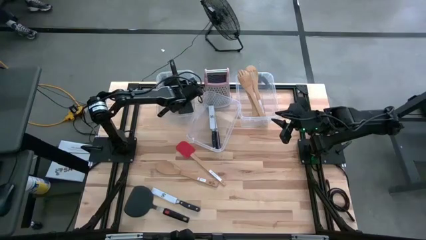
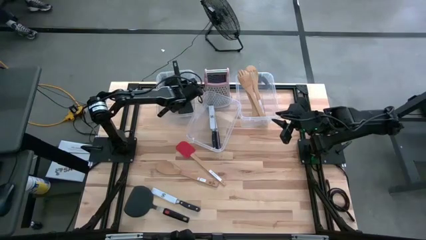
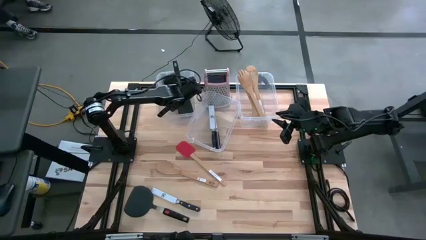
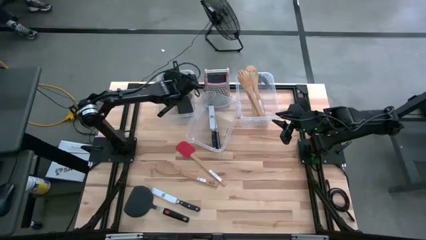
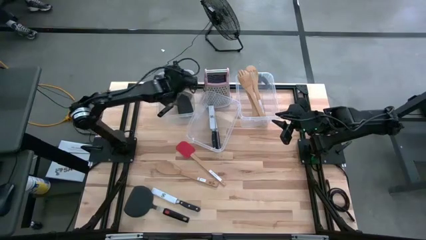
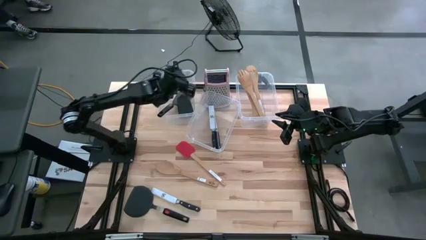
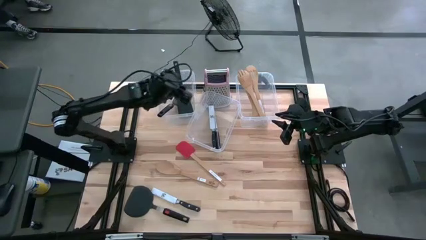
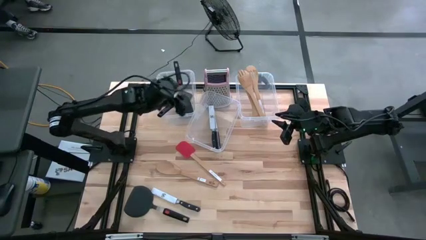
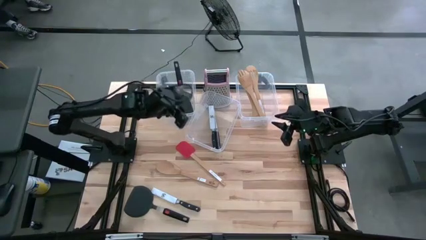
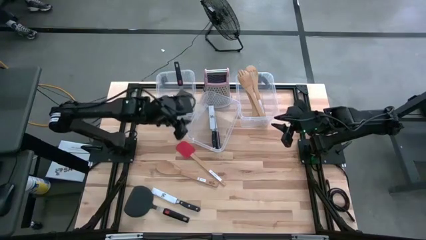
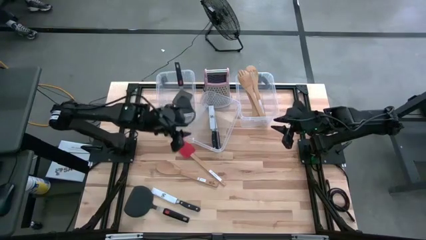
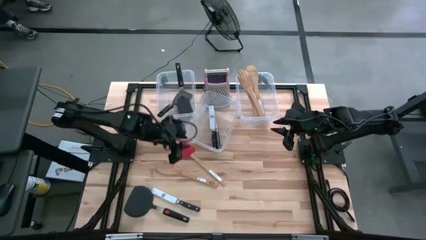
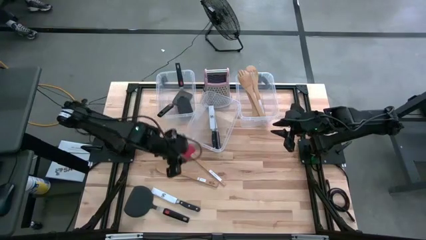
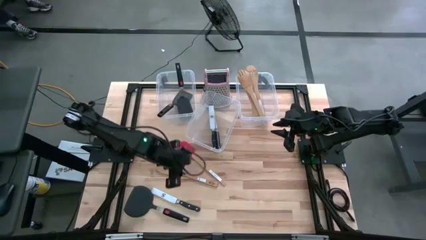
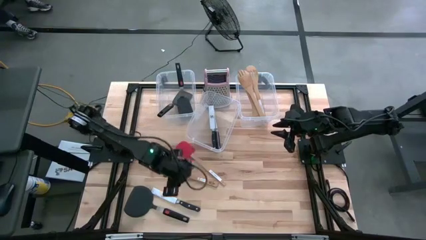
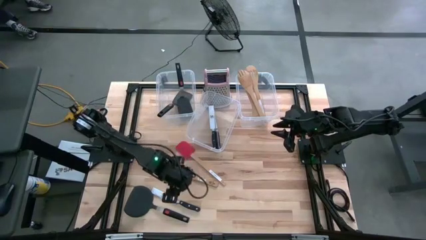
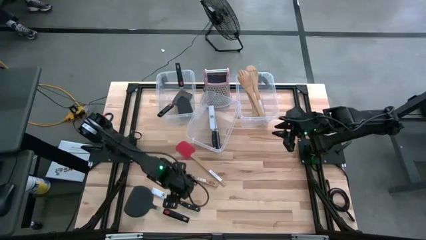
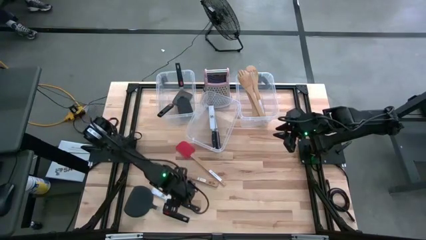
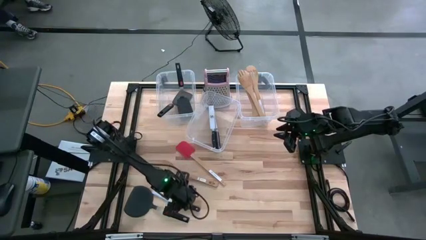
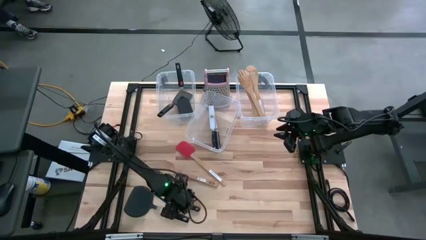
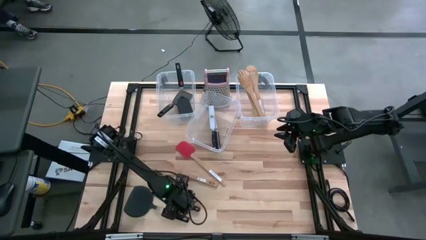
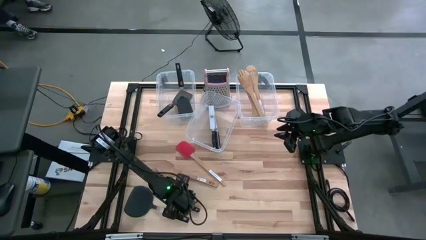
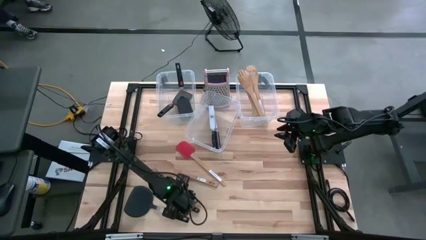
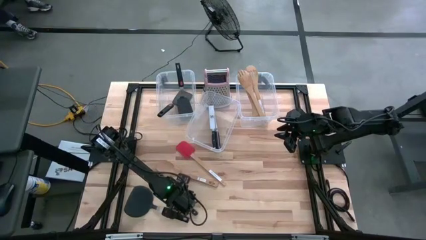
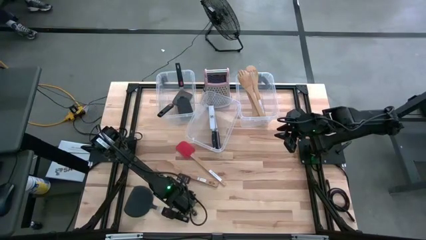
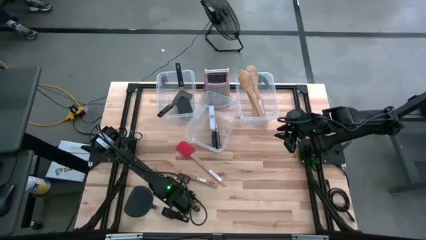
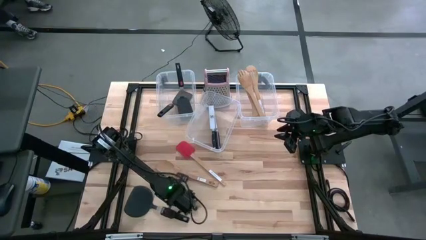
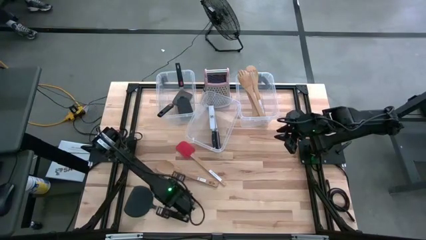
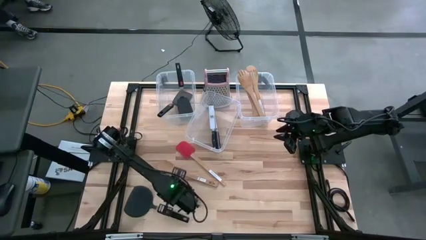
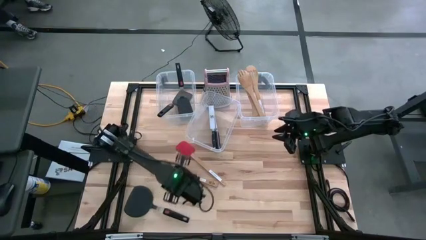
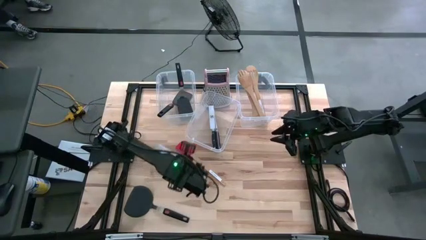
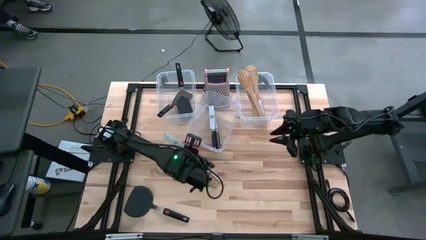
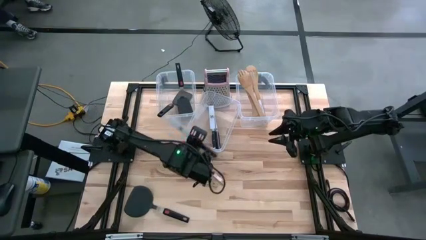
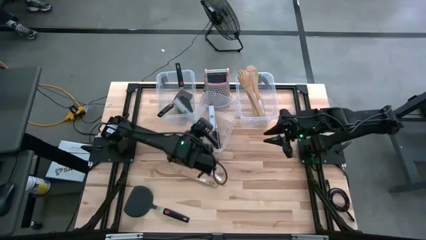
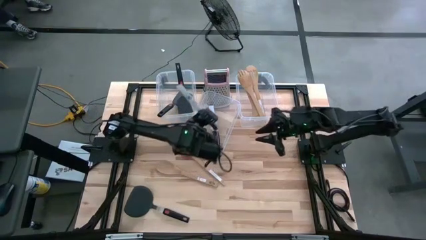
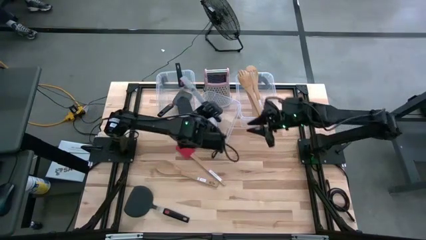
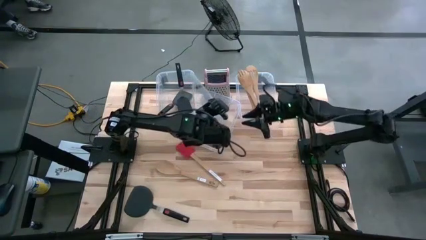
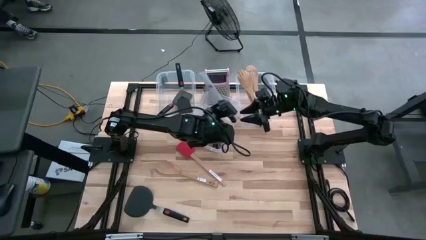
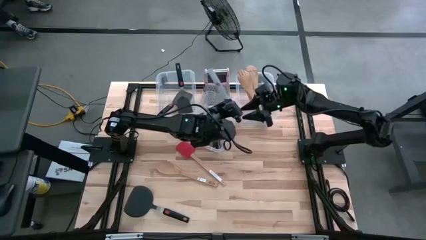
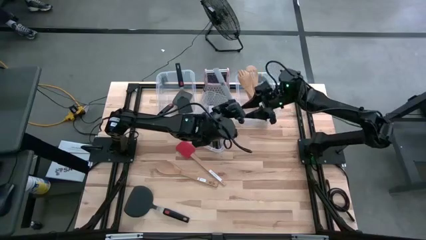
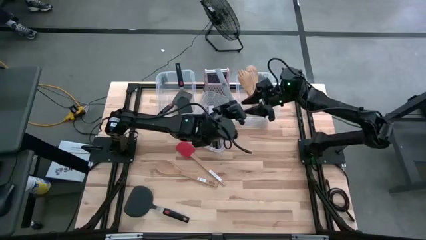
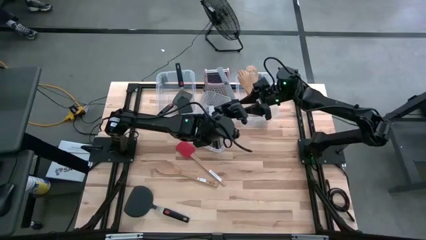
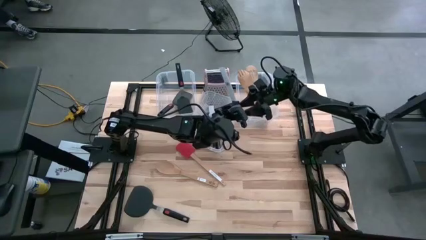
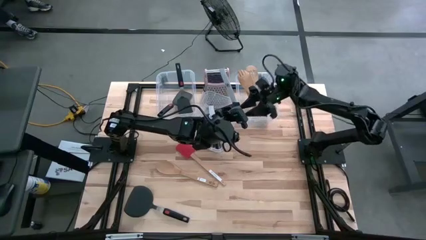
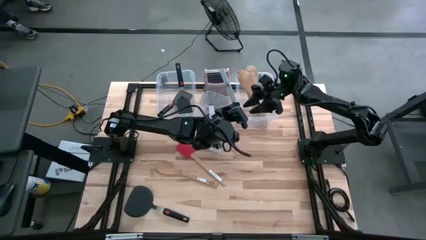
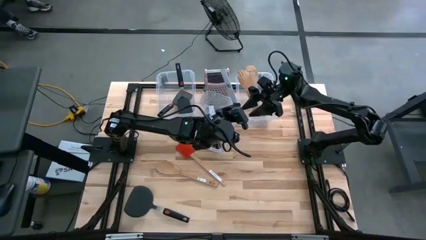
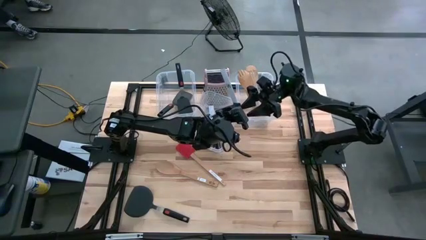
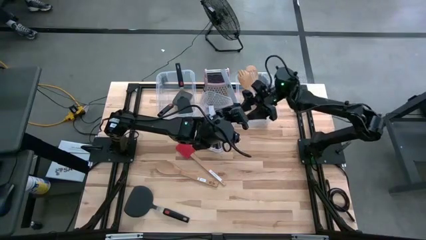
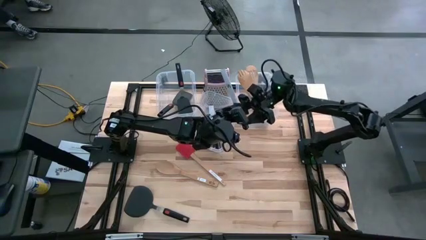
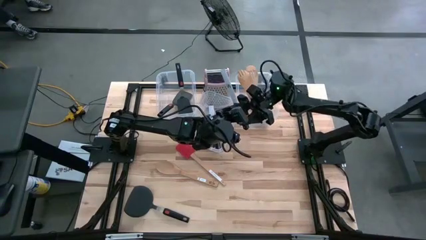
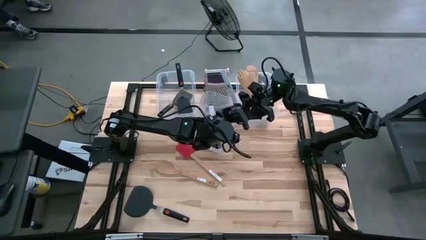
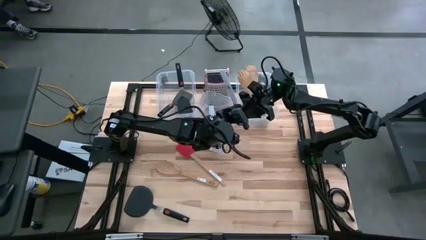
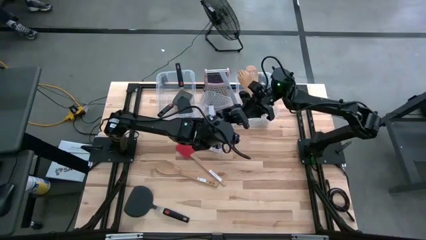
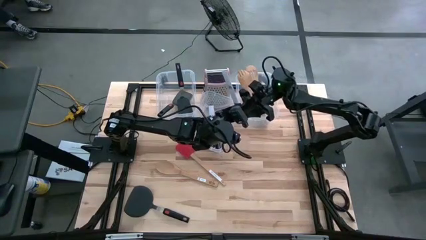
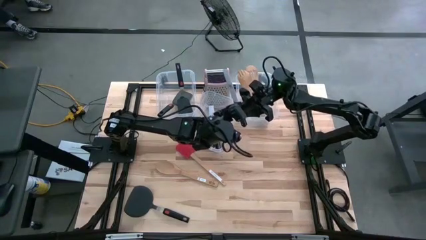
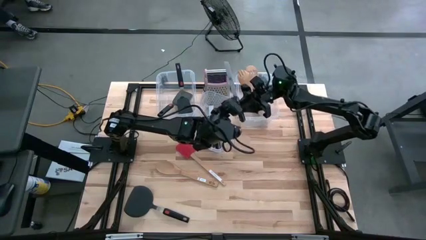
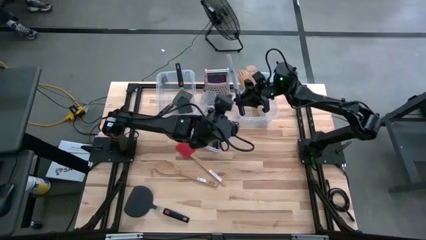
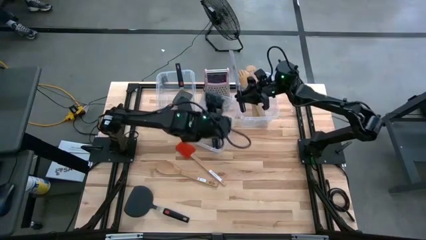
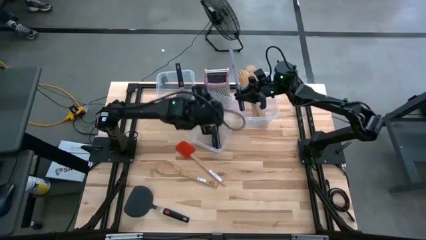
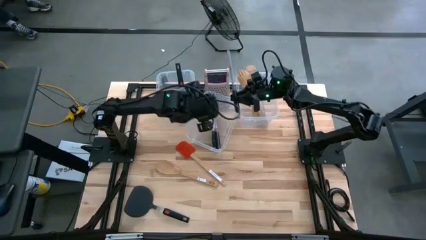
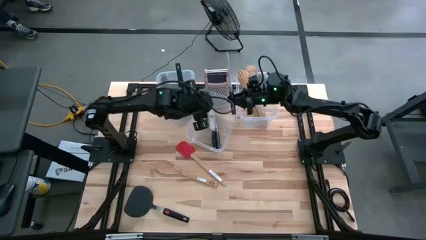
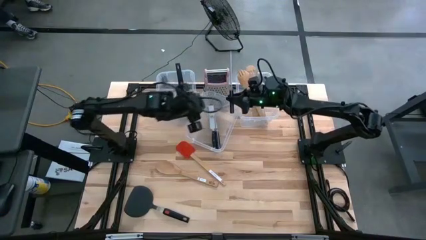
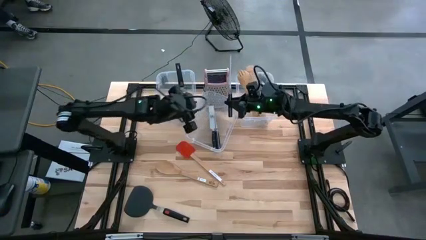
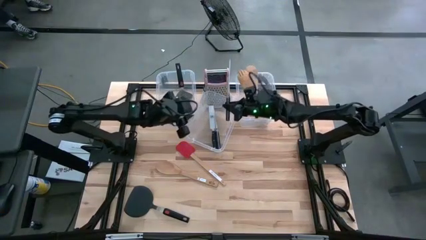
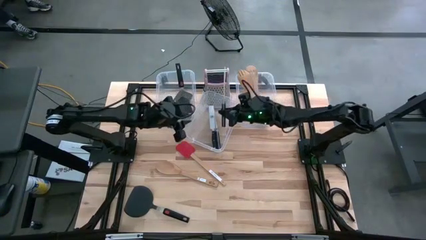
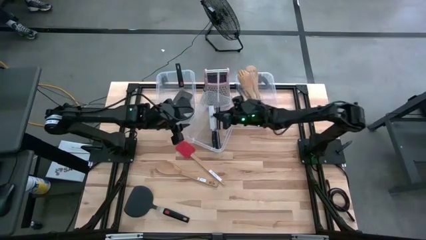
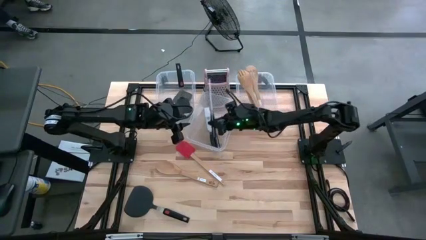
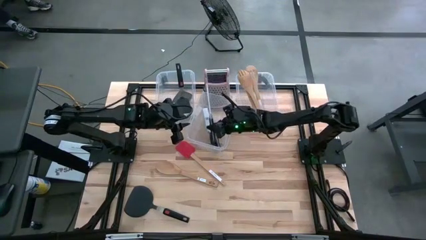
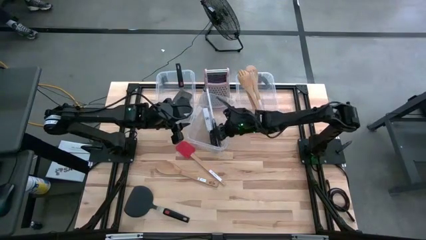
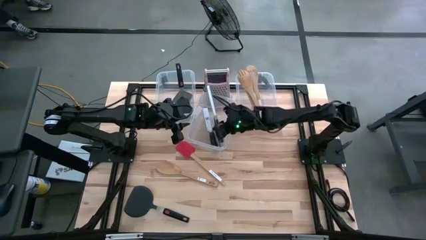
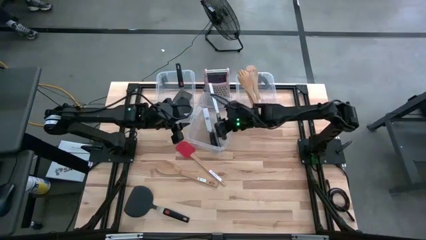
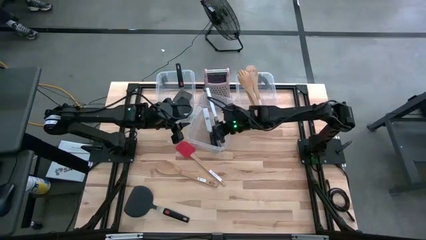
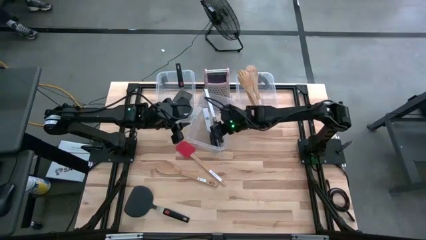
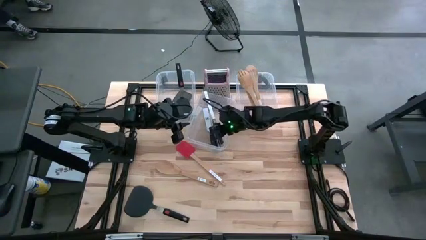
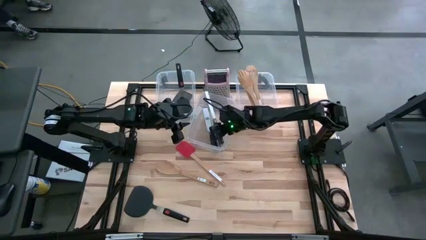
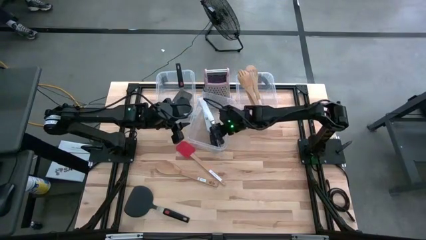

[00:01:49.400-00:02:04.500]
Task: Pick & Place Kitchen Items
Put the black knife into the middle transparent bin
